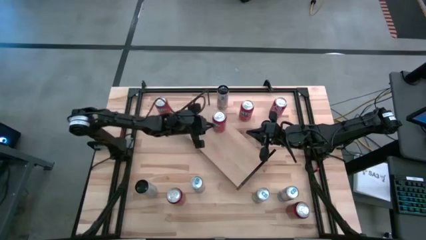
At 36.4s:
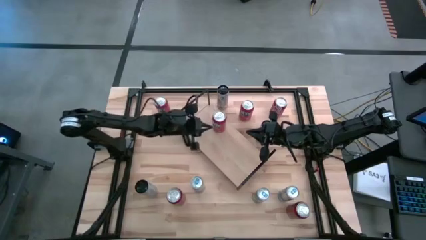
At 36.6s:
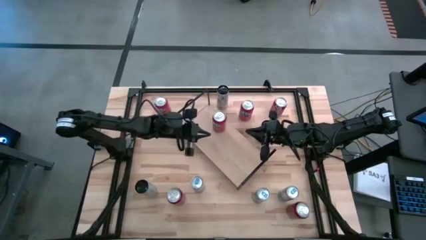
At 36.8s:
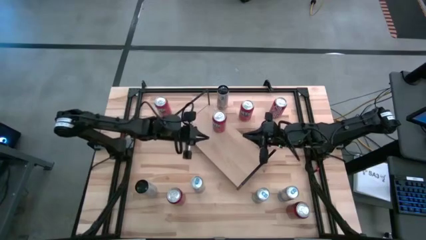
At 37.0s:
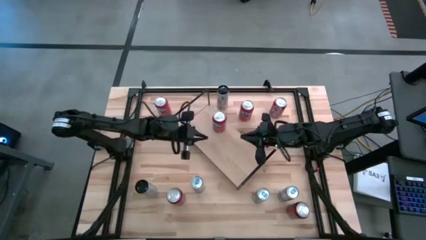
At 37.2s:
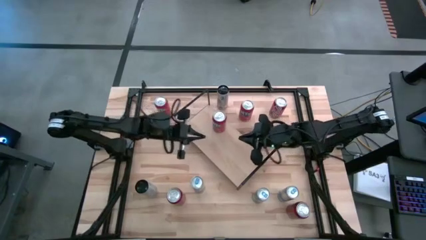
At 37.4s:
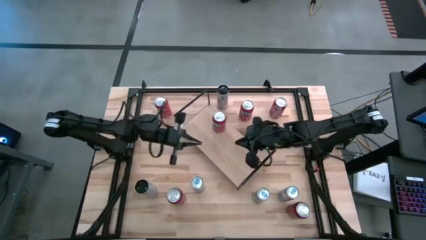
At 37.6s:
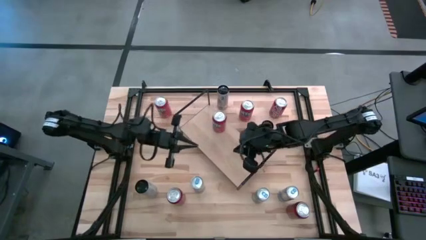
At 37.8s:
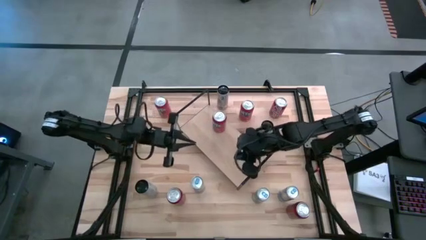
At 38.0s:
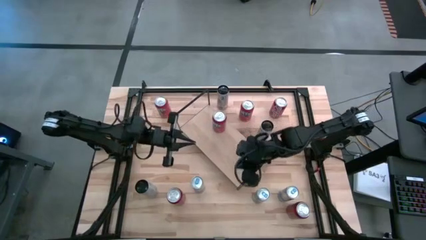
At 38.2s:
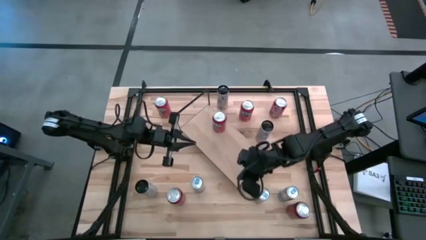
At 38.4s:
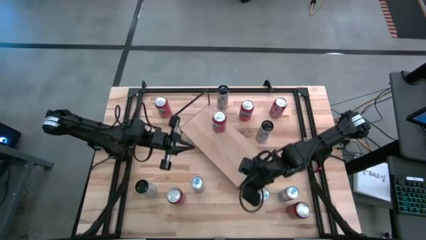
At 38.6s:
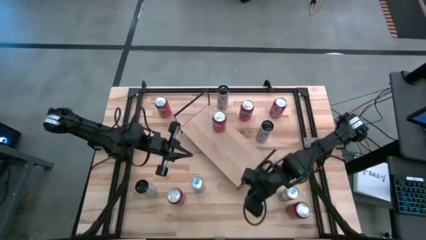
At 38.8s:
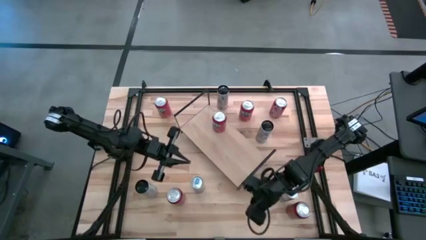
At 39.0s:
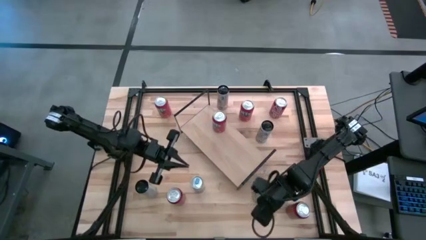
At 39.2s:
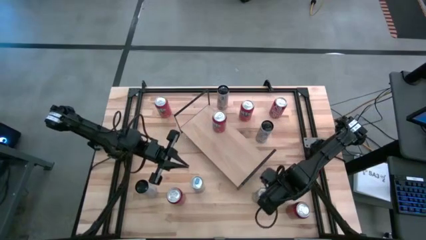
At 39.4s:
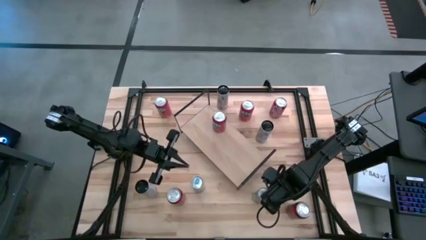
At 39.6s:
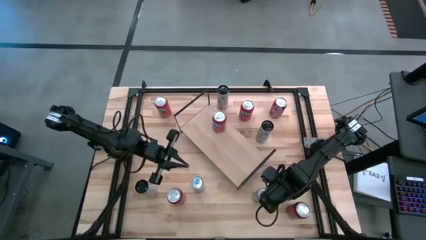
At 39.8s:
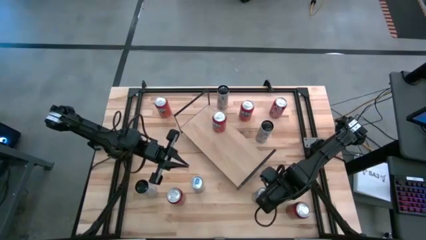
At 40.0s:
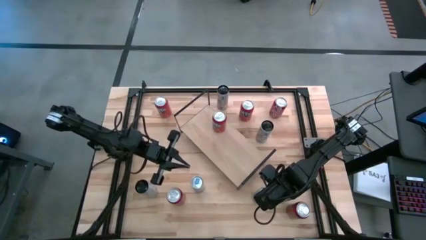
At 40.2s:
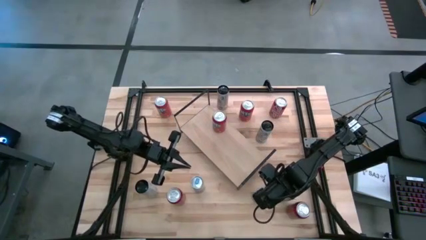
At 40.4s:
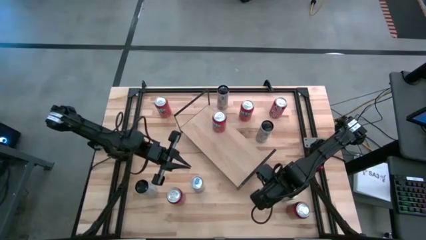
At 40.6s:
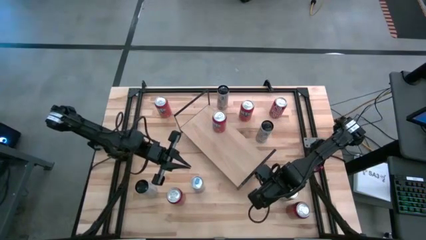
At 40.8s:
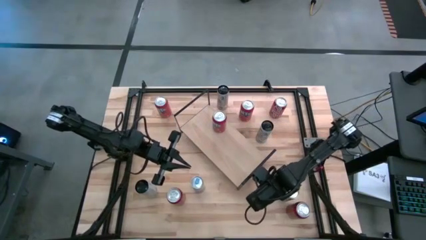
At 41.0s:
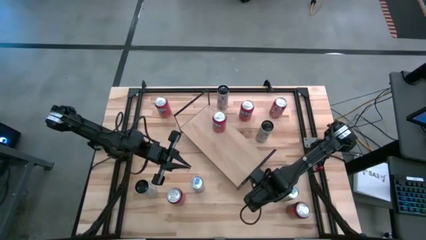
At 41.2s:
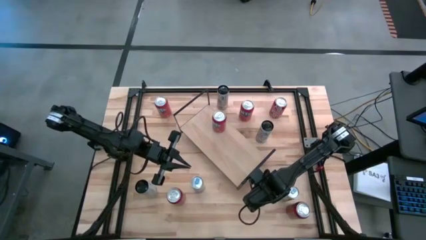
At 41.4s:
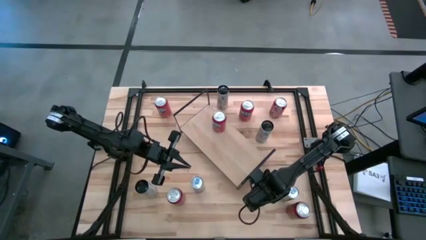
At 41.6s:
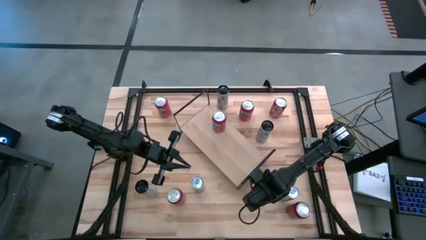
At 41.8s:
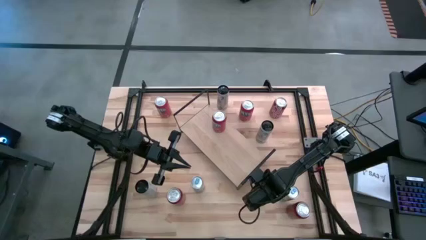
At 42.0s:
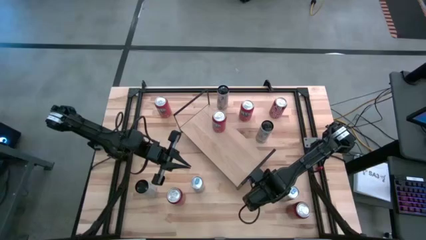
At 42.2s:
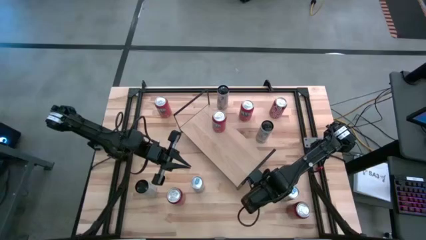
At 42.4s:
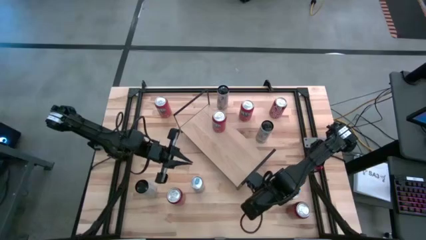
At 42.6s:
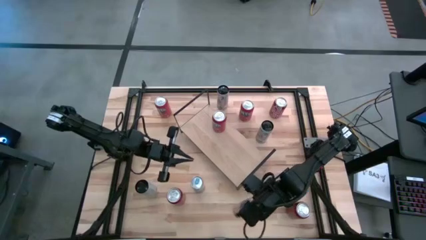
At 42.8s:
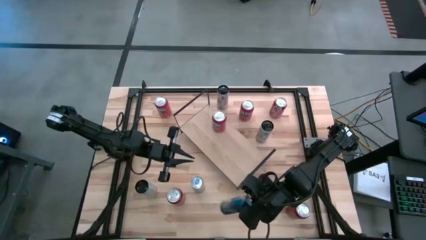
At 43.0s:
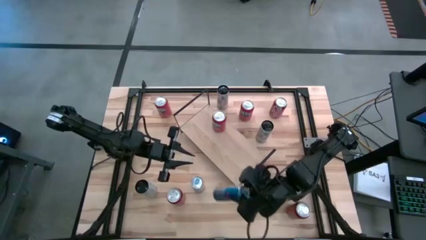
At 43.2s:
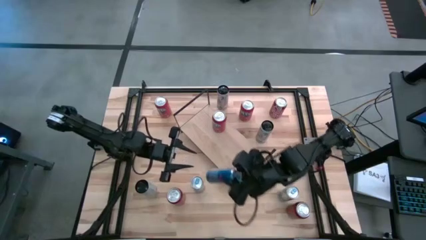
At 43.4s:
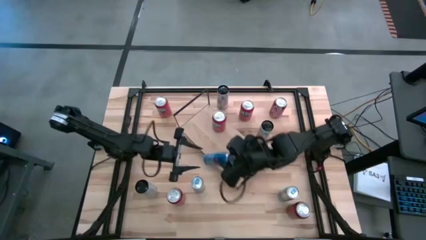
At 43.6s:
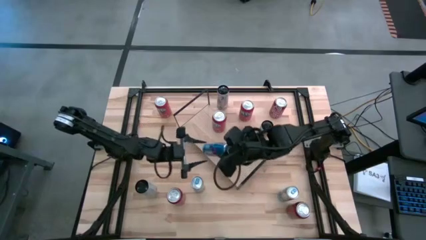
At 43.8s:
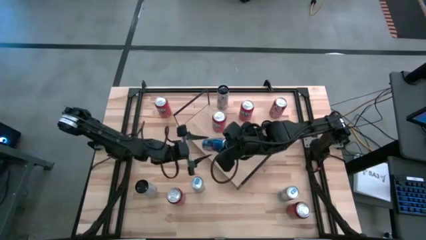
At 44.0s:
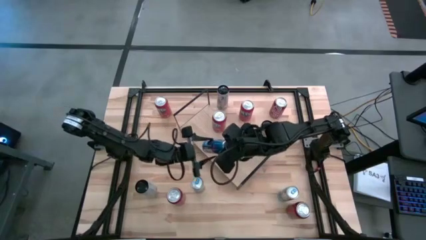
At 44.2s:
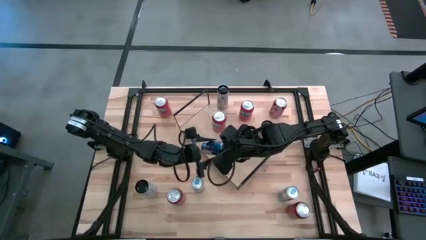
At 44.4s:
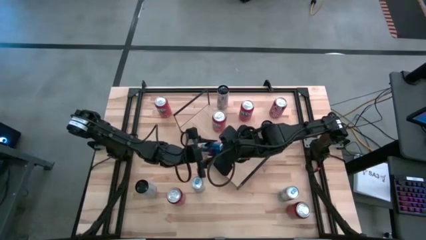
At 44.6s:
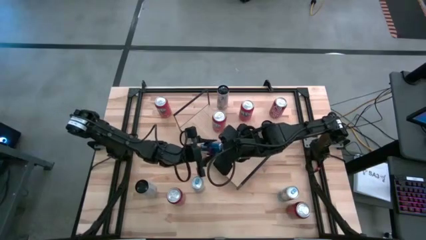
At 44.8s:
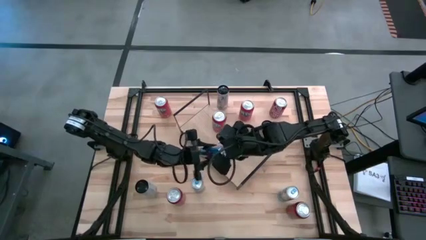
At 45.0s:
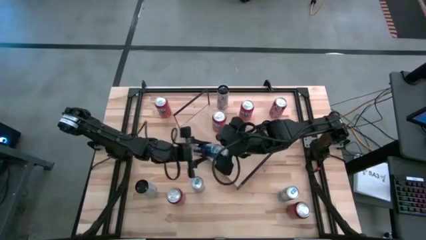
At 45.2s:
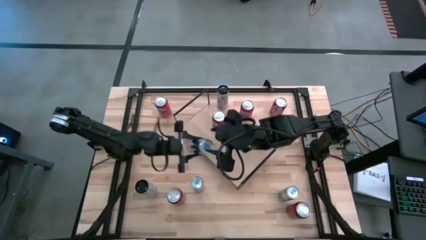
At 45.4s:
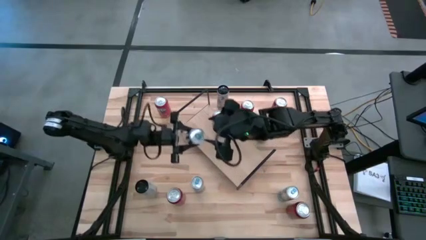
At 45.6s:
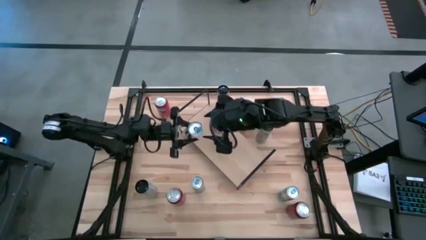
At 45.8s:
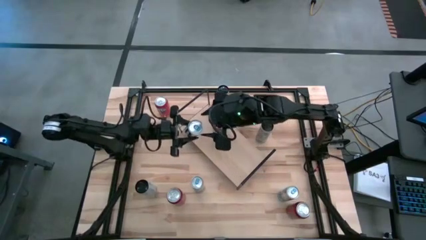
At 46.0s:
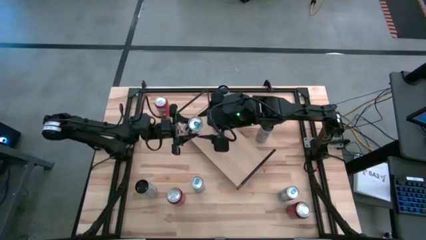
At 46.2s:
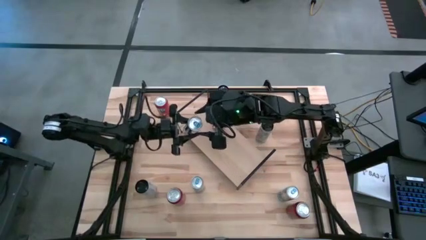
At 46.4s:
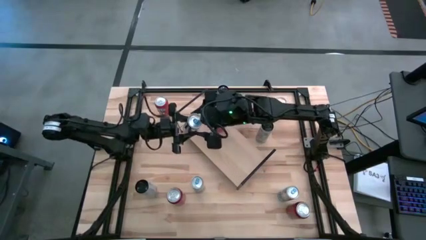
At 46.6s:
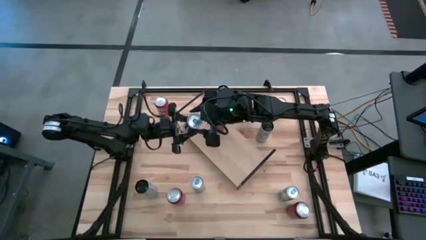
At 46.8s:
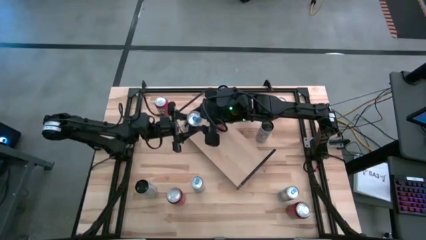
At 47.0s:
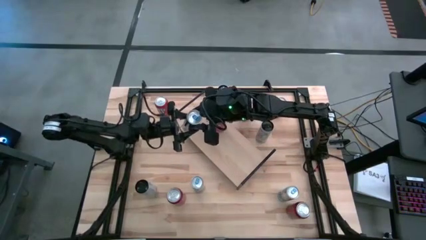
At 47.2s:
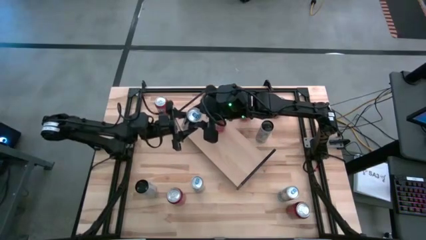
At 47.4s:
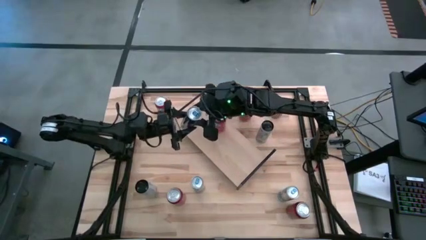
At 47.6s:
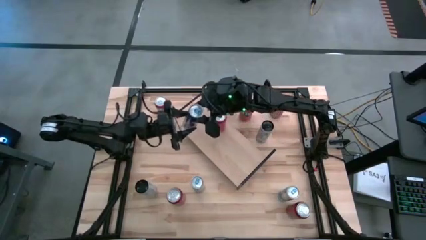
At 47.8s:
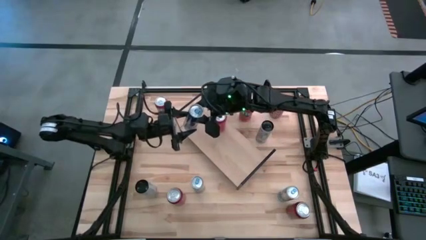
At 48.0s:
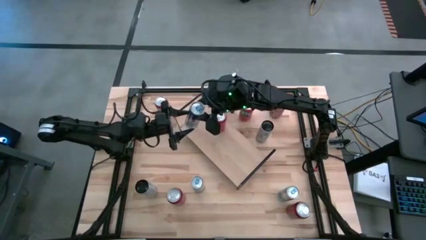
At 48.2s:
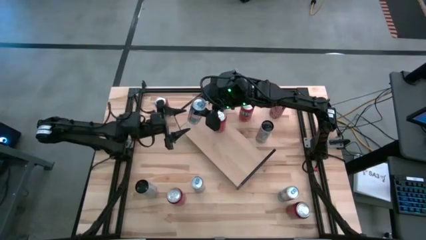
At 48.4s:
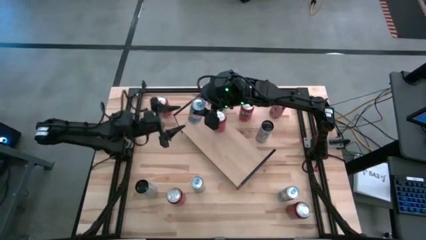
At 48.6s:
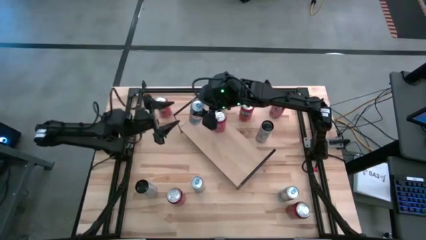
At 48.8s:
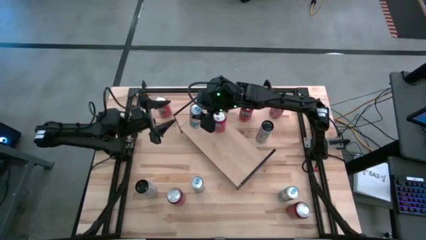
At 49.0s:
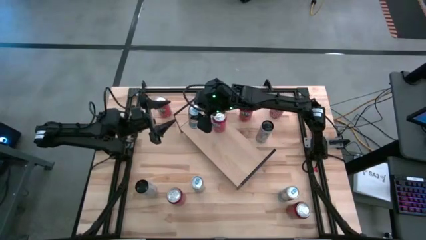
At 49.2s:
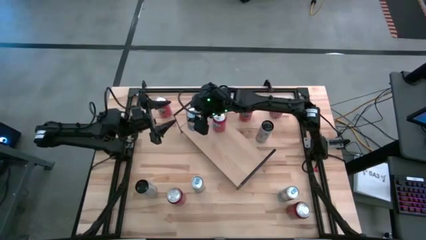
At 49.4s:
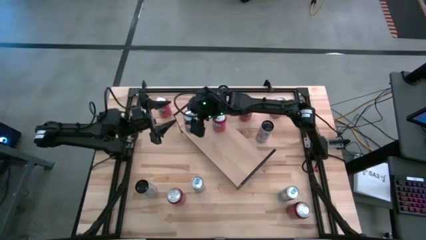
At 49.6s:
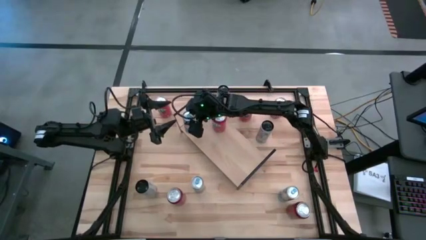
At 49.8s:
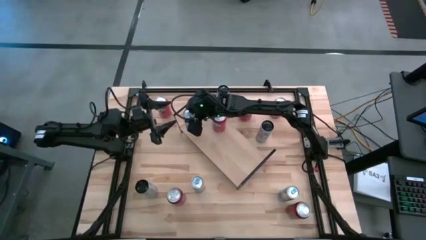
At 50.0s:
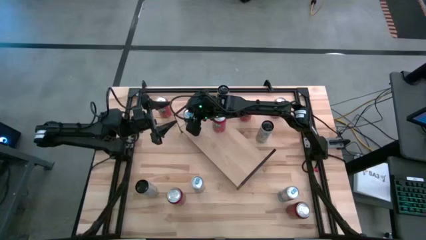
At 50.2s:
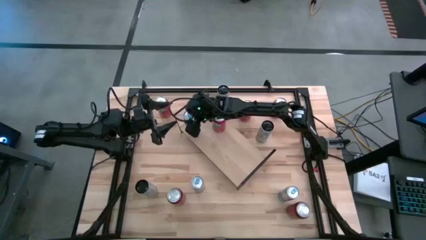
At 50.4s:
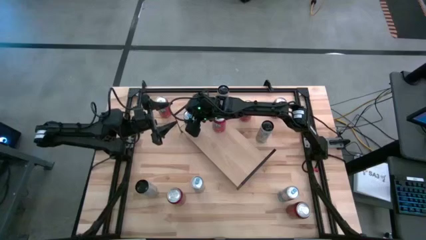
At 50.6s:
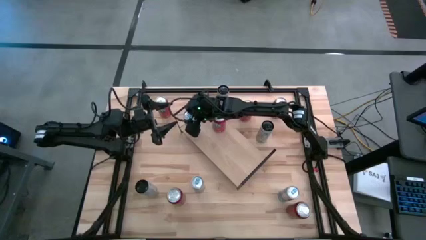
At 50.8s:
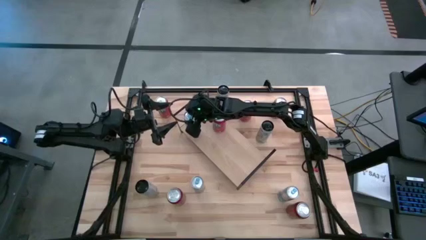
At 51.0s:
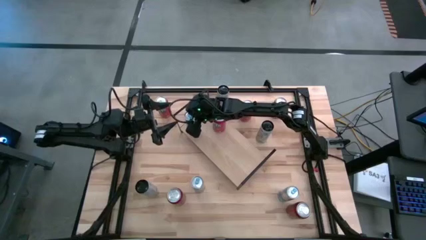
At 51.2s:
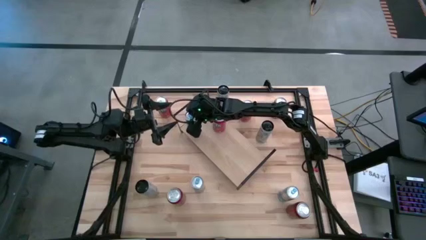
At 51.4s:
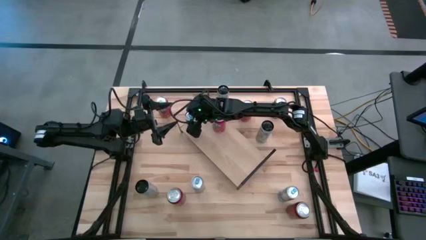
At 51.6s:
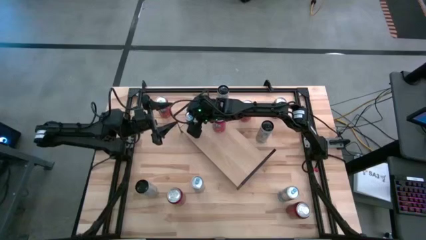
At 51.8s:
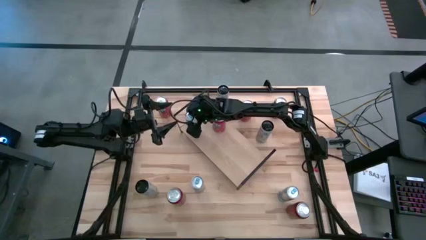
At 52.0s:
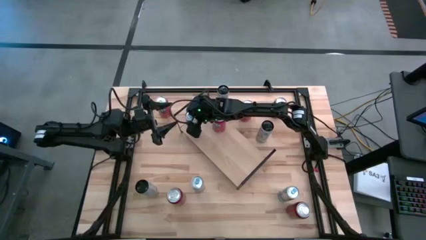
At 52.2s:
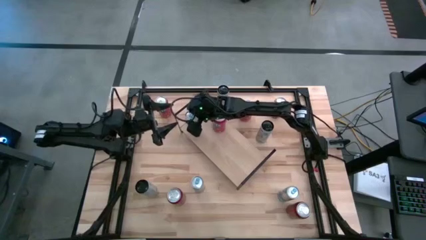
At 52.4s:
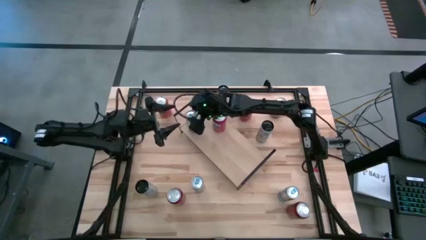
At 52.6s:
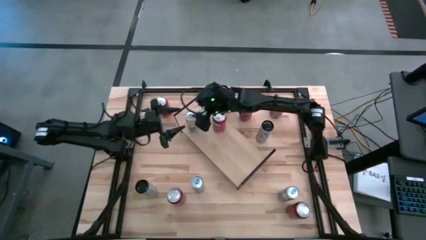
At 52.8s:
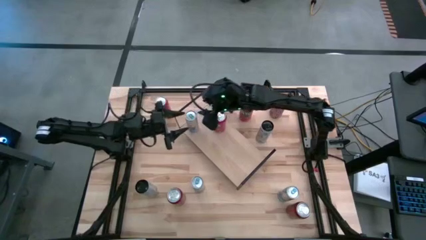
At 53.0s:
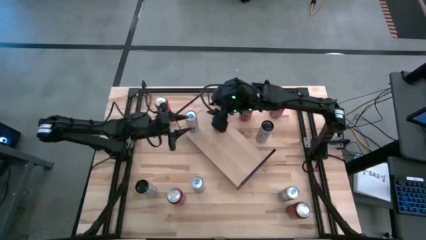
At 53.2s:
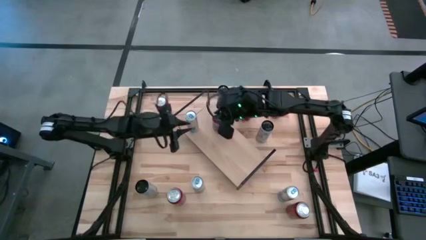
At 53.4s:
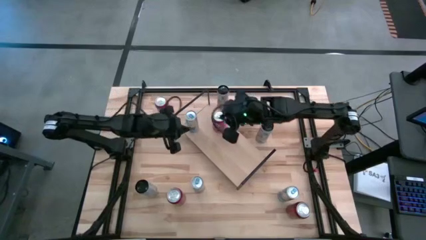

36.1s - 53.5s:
Task: Place canned beverage on shelf
Put the center blue soda can on the shelf
